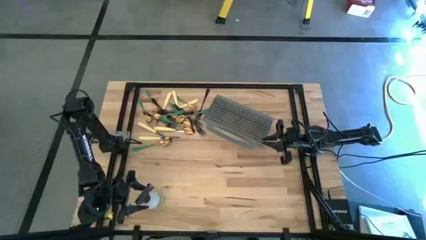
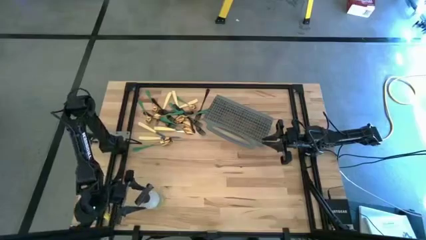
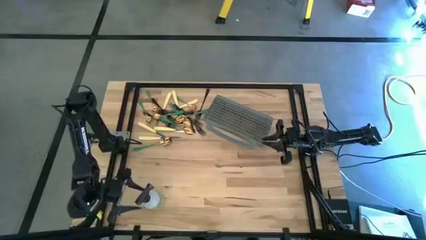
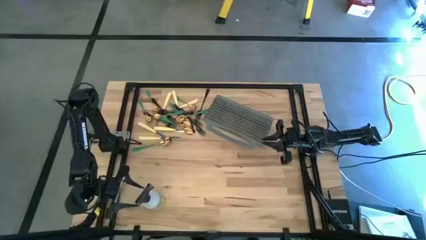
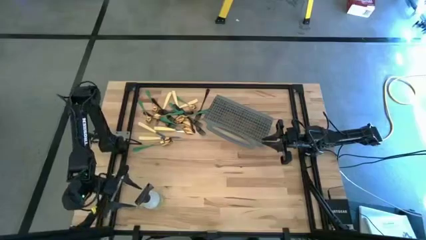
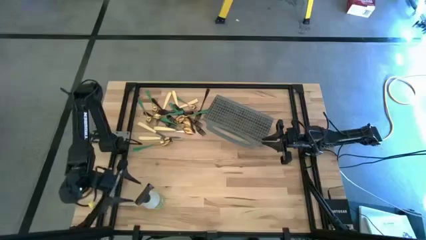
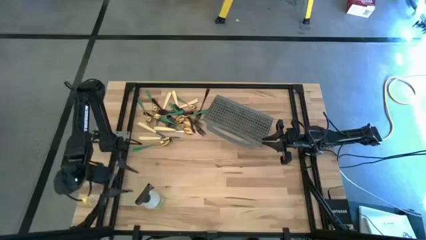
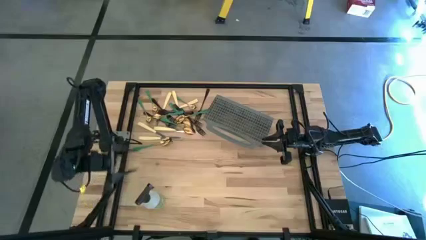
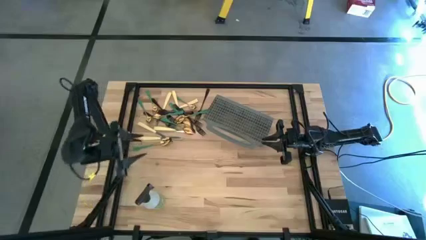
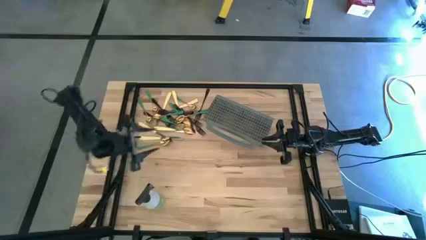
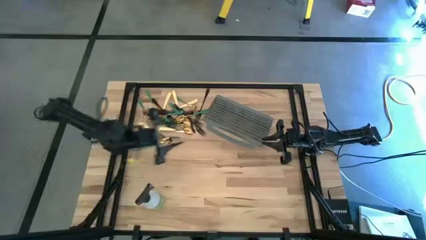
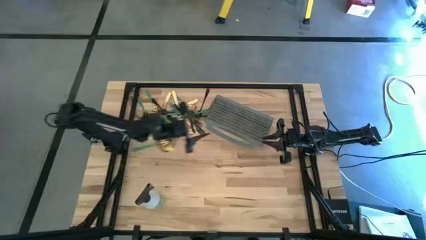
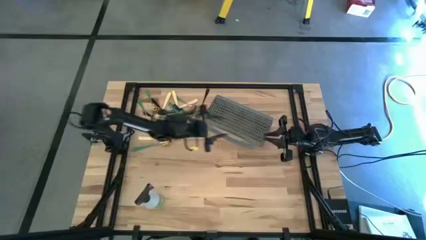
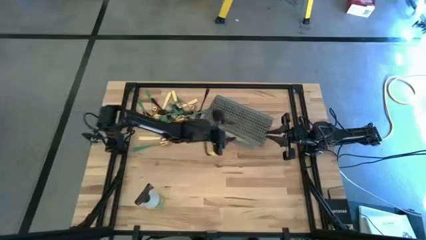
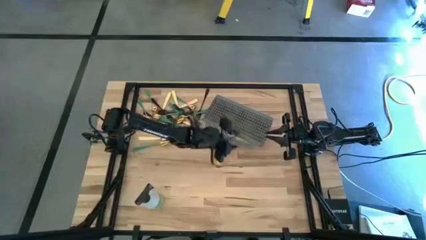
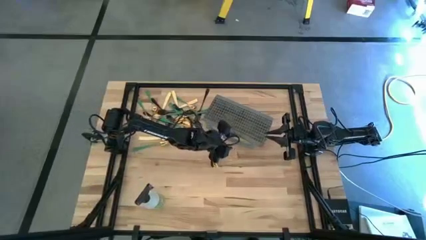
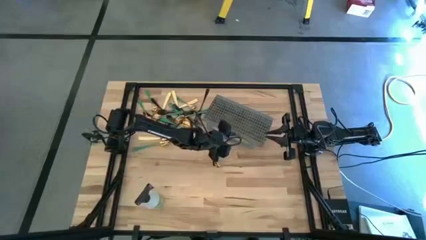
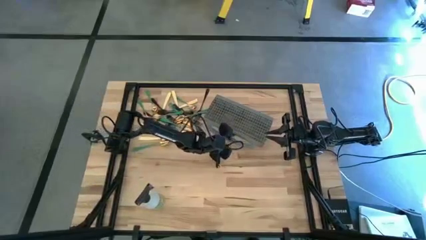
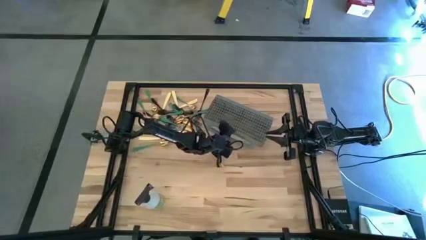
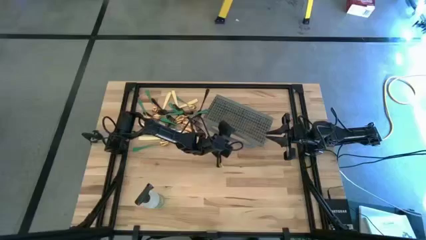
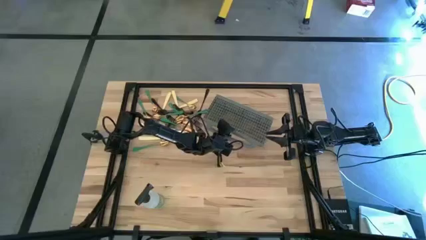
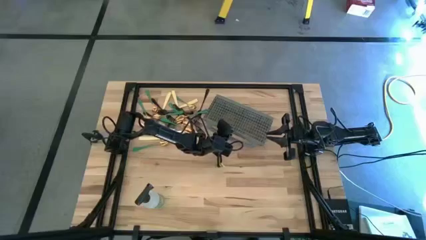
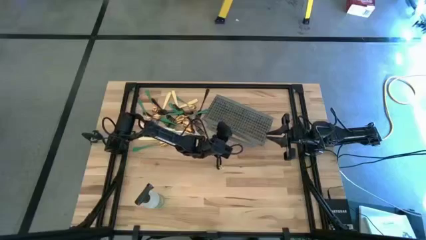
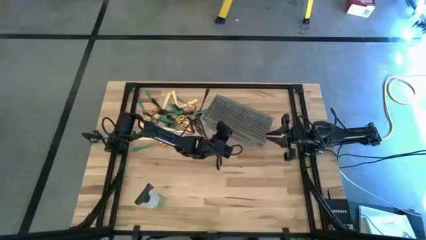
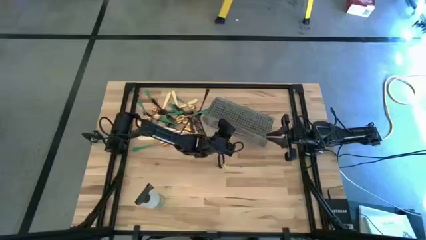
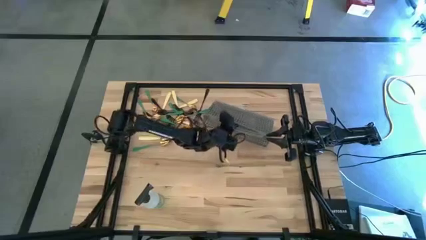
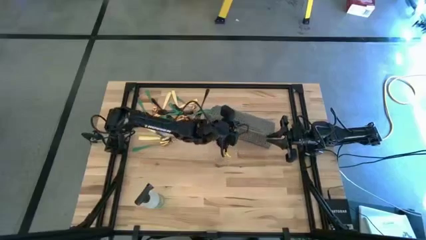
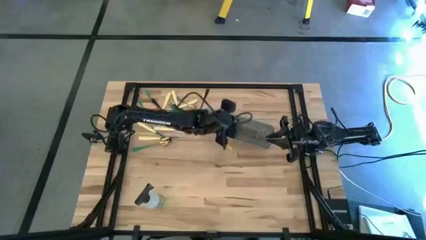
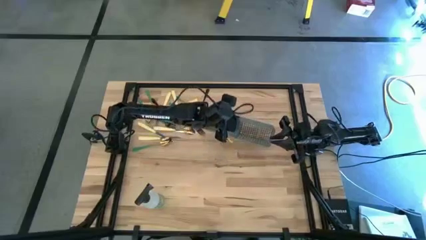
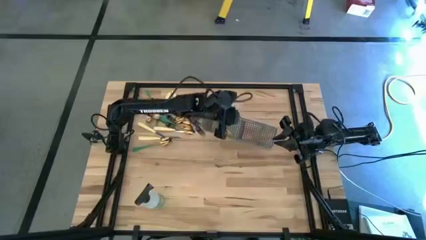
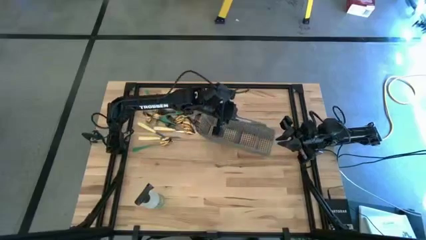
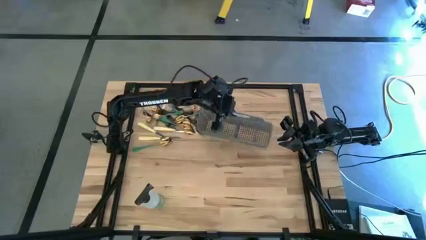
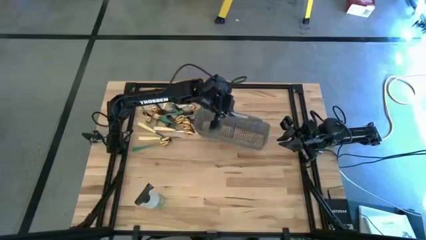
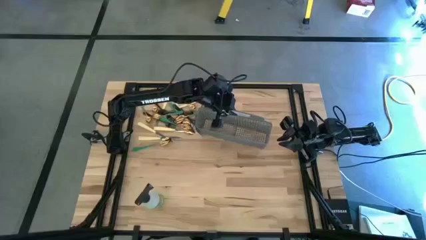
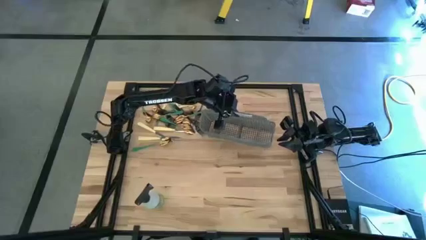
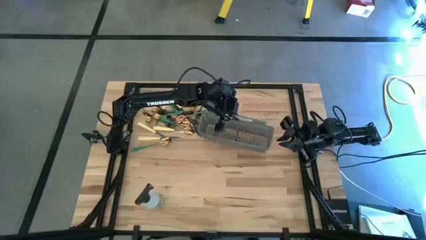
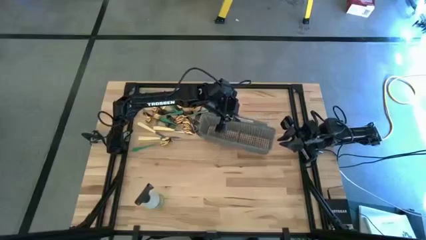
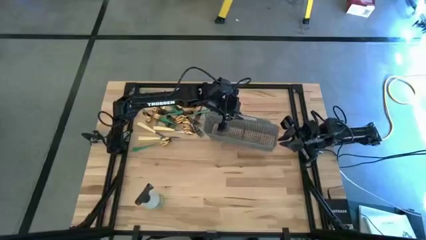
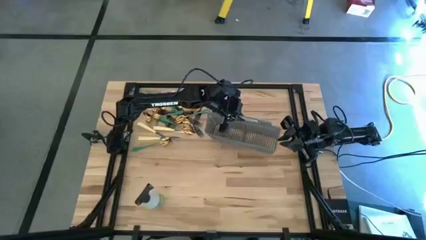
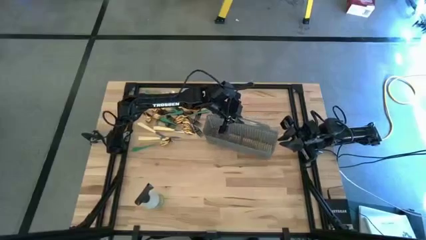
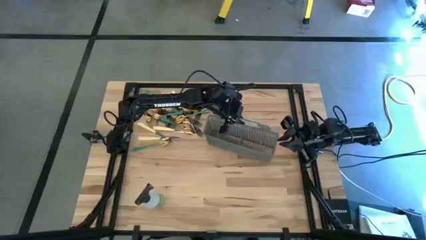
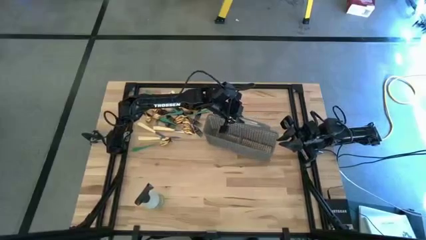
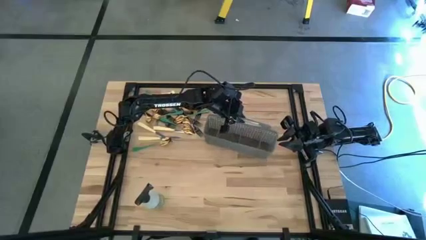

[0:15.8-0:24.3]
Task: Sort silverware
Prepare the cutlery rack

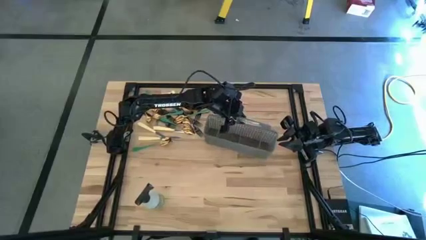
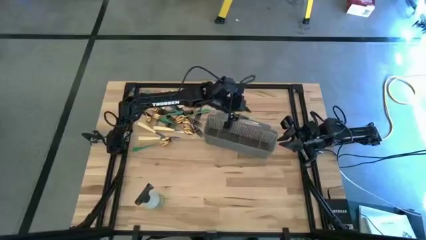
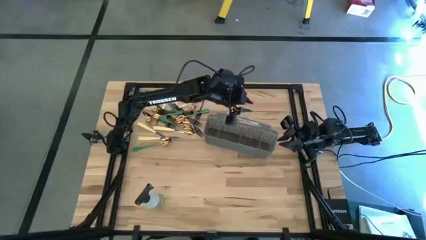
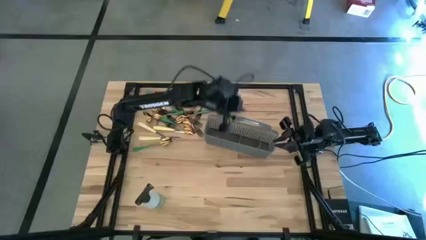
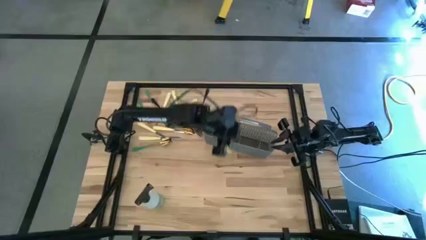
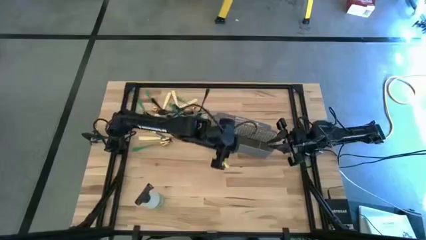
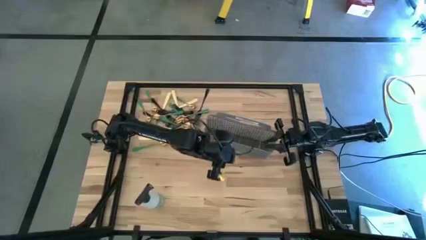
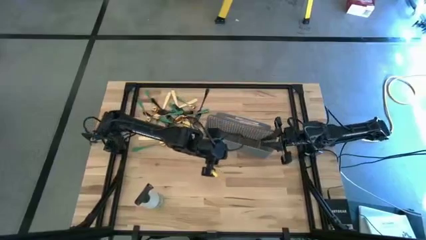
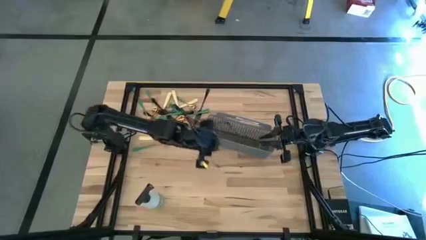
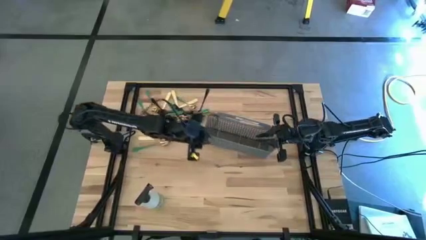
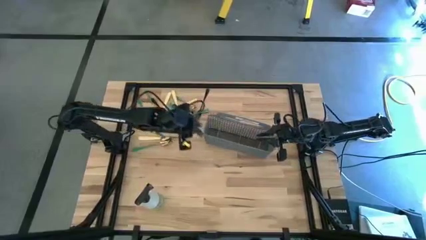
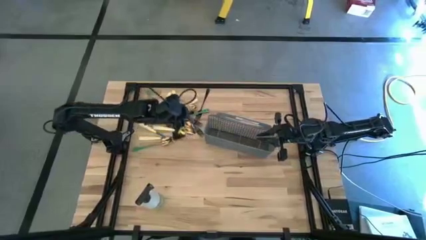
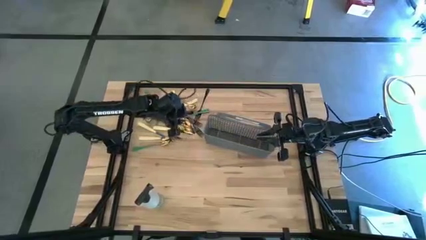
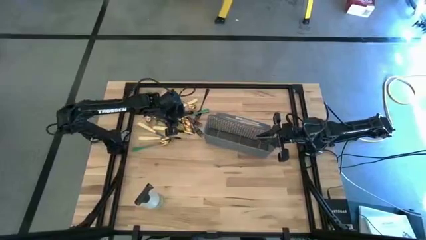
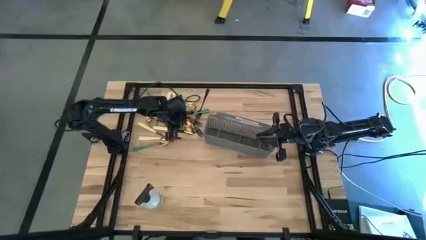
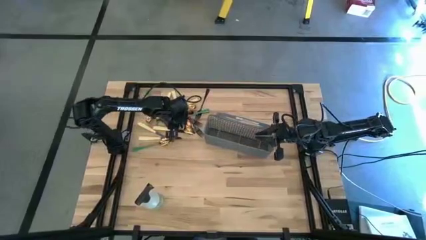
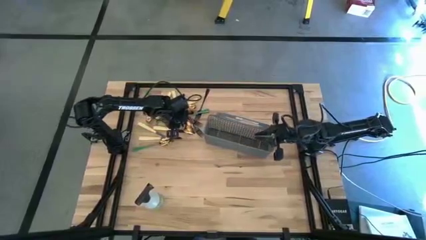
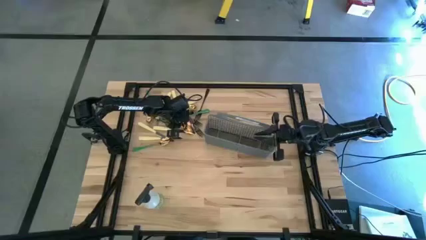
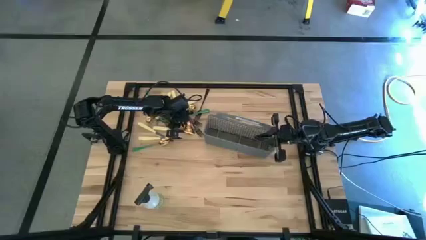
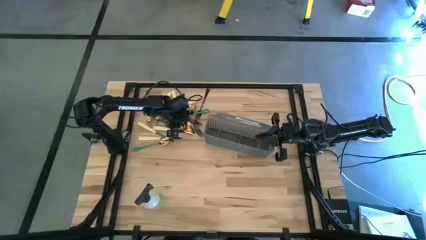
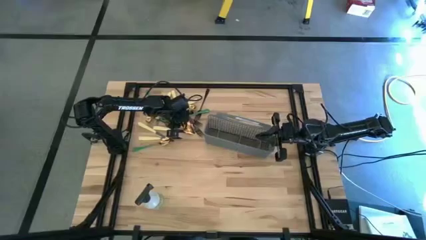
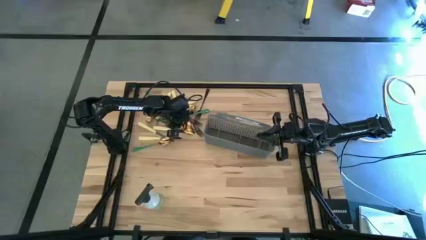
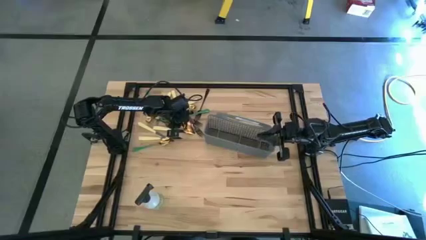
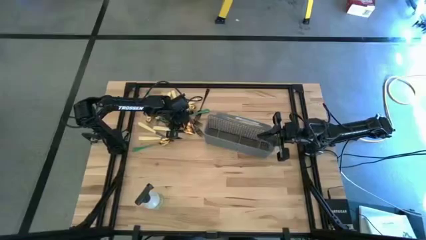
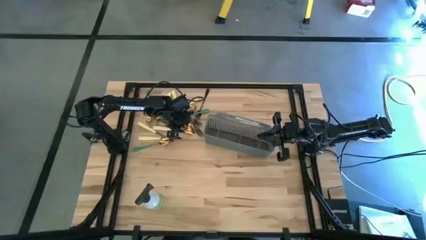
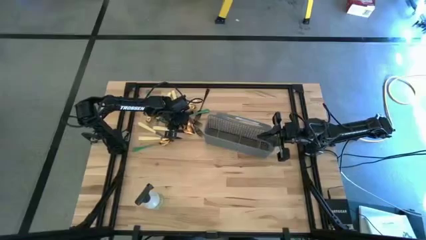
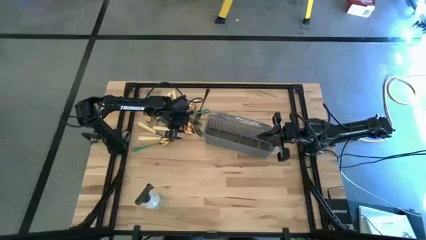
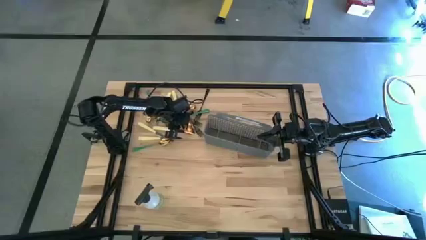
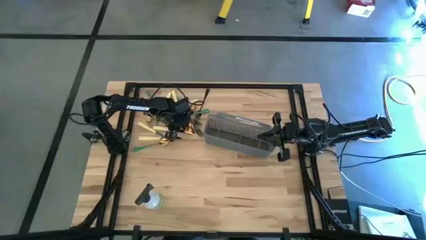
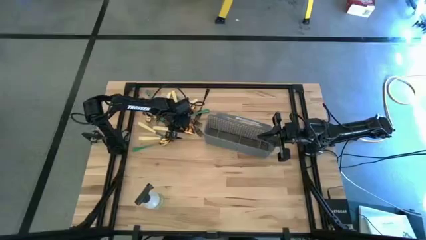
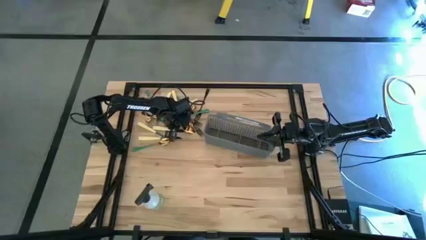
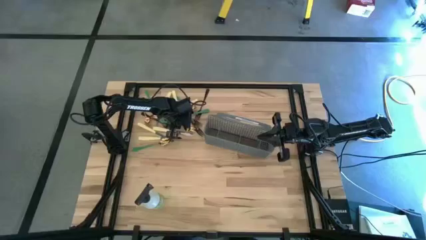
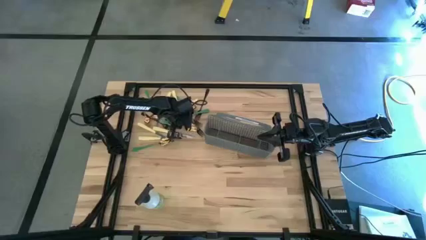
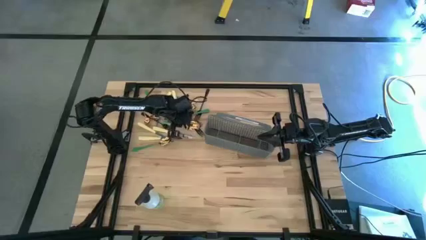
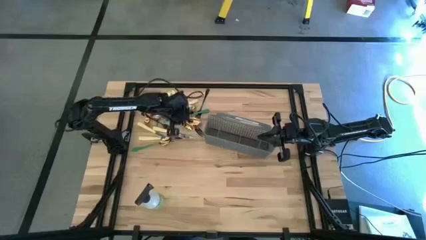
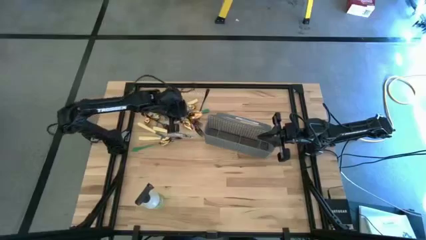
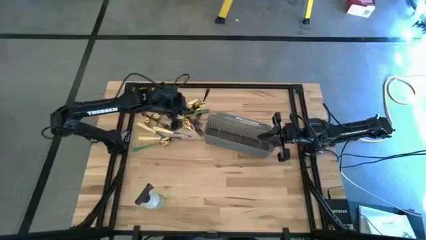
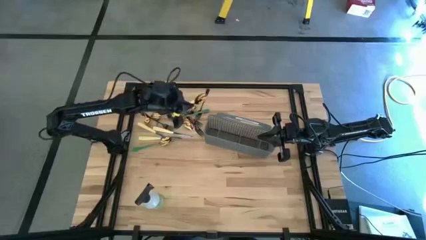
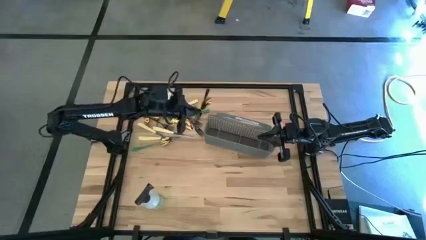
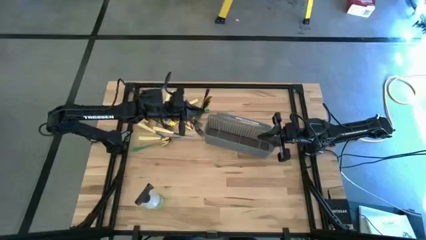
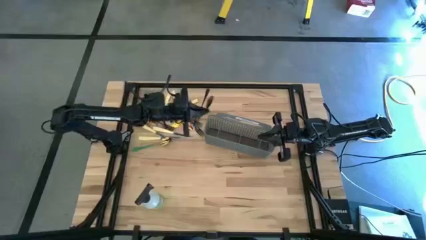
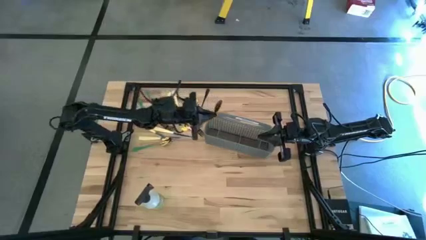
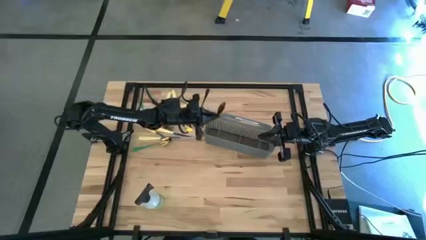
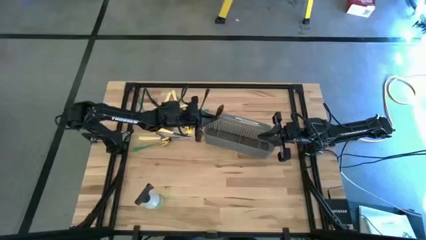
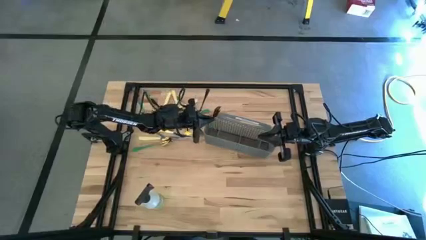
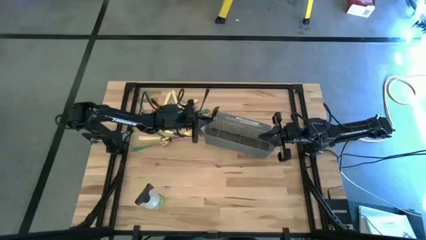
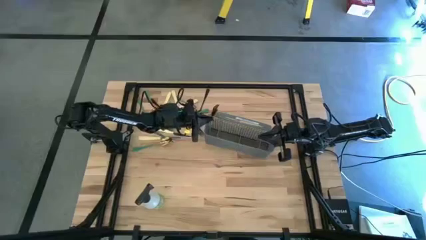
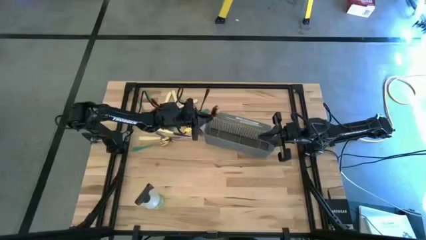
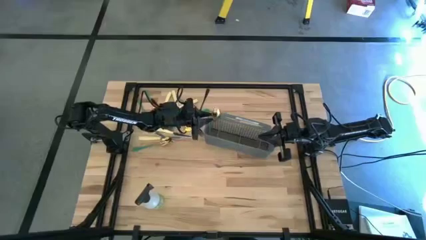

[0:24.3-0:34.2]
Put the gold spoon into the cutlery rack
